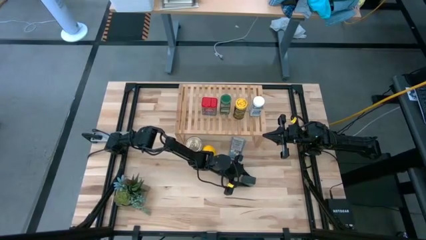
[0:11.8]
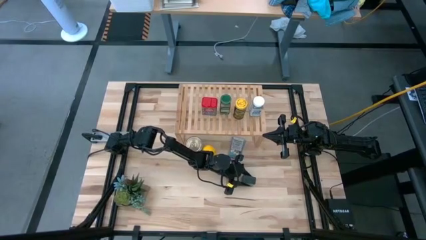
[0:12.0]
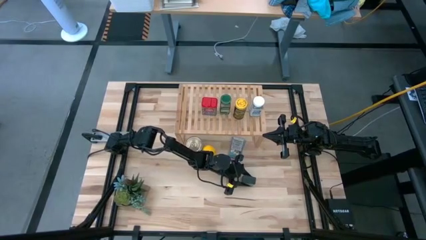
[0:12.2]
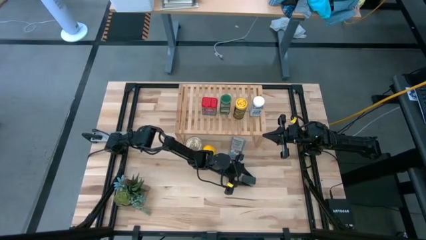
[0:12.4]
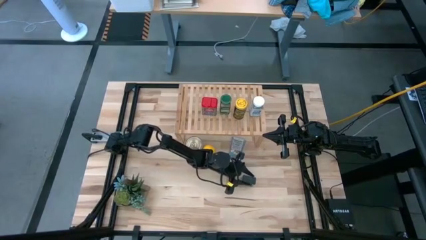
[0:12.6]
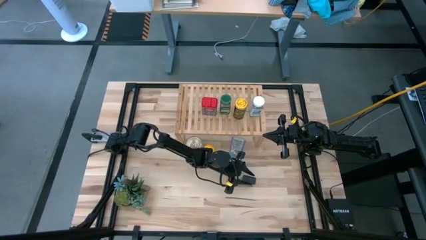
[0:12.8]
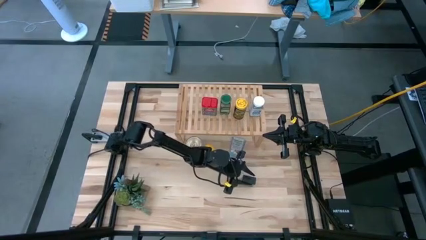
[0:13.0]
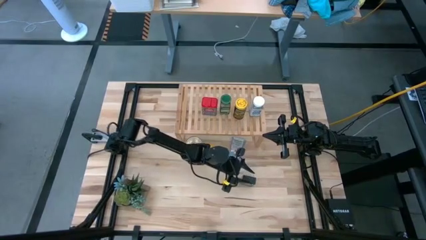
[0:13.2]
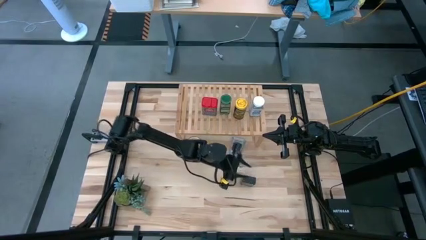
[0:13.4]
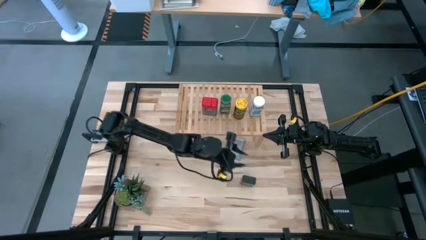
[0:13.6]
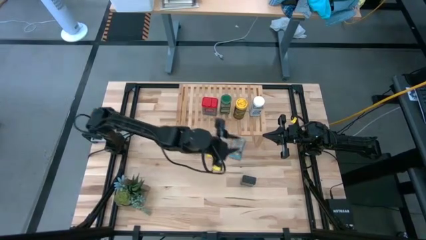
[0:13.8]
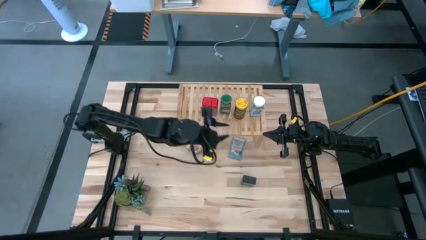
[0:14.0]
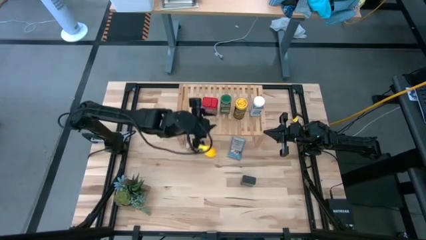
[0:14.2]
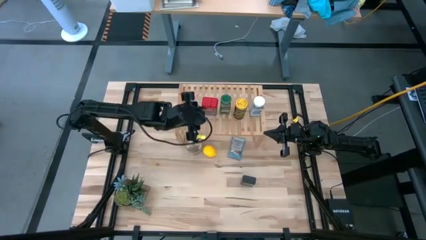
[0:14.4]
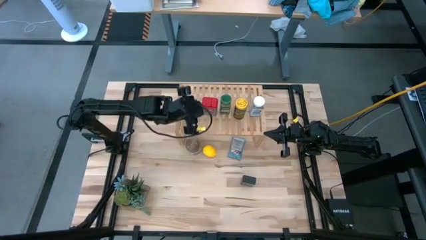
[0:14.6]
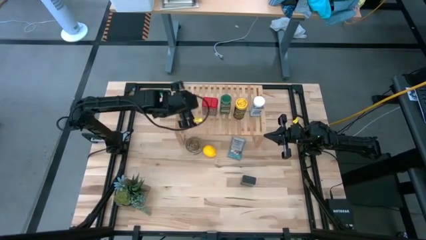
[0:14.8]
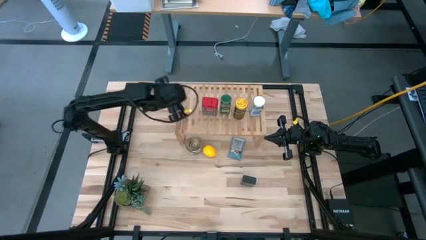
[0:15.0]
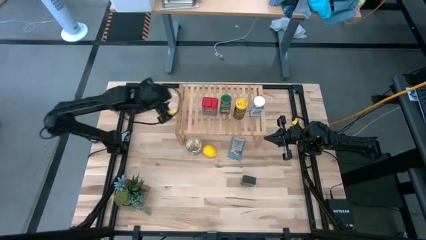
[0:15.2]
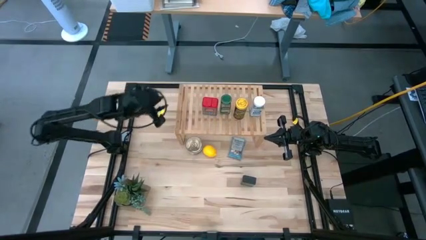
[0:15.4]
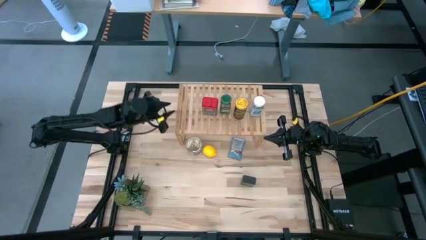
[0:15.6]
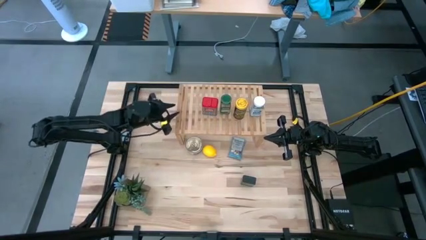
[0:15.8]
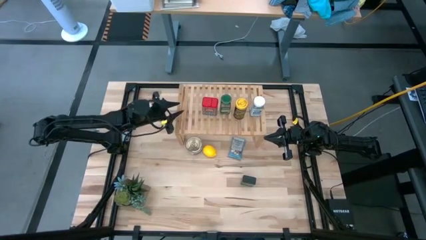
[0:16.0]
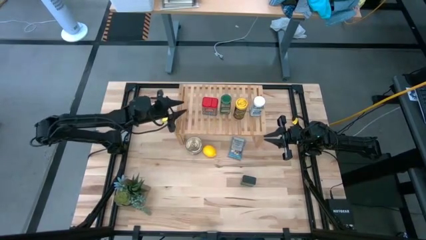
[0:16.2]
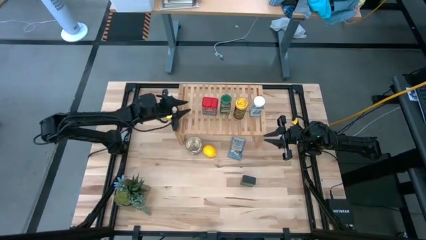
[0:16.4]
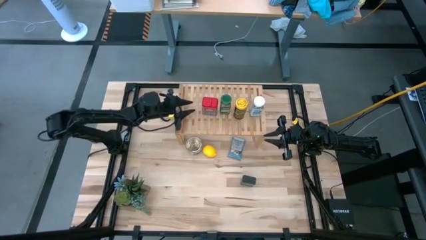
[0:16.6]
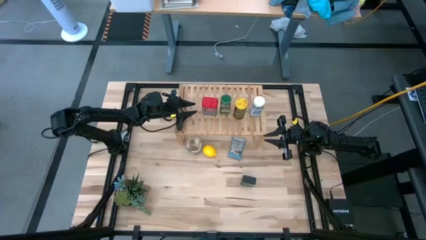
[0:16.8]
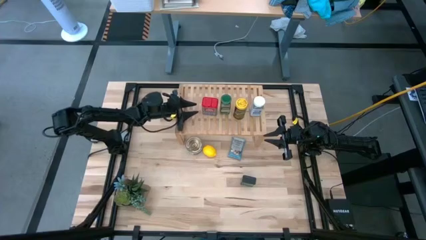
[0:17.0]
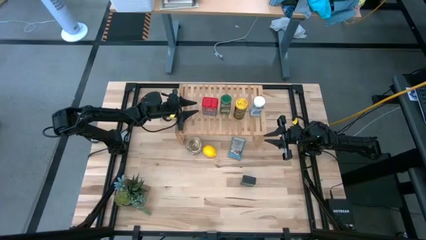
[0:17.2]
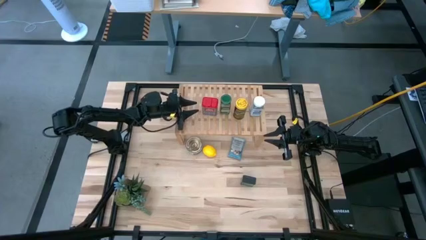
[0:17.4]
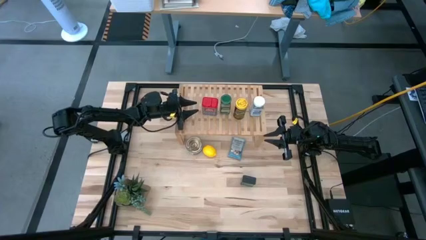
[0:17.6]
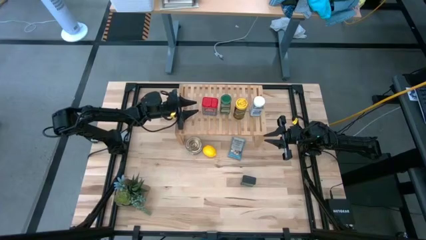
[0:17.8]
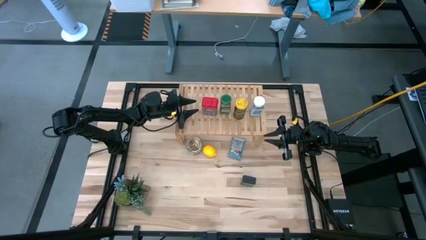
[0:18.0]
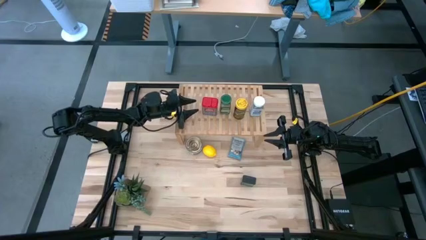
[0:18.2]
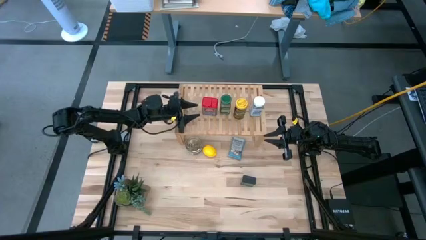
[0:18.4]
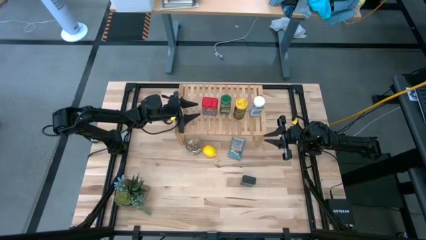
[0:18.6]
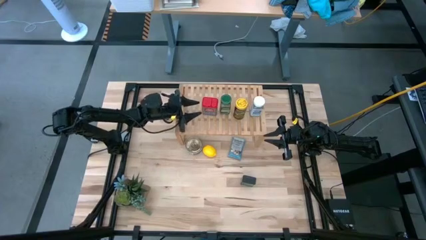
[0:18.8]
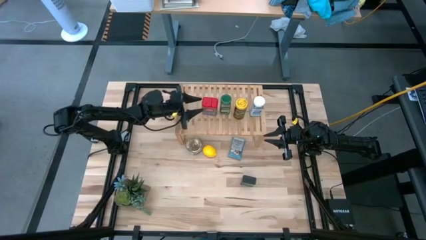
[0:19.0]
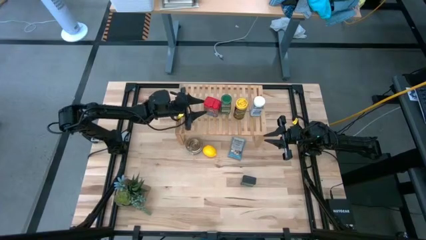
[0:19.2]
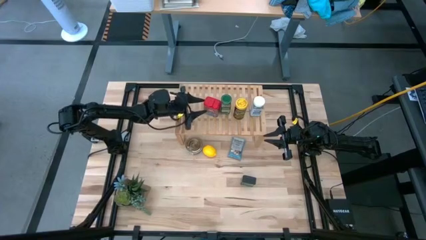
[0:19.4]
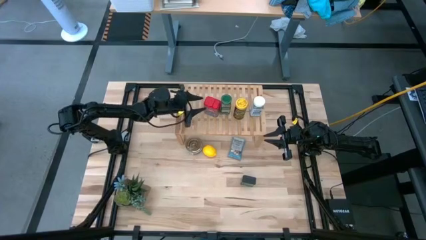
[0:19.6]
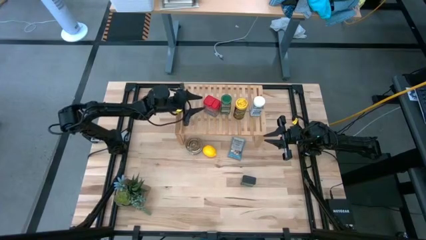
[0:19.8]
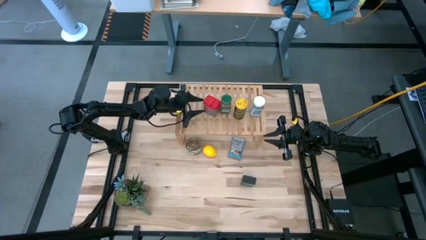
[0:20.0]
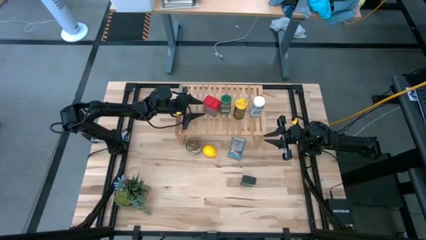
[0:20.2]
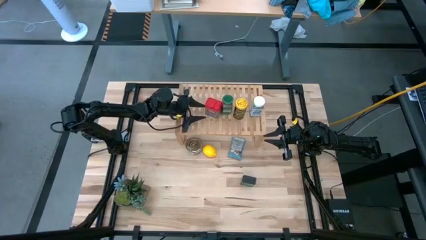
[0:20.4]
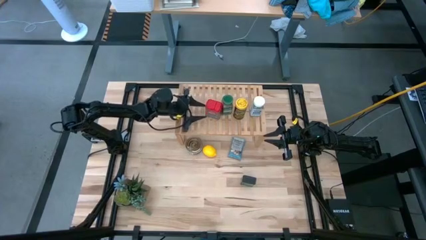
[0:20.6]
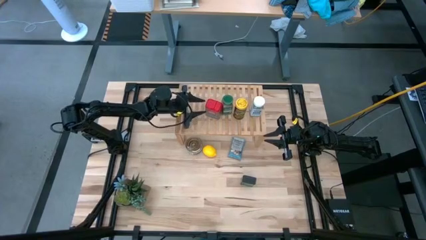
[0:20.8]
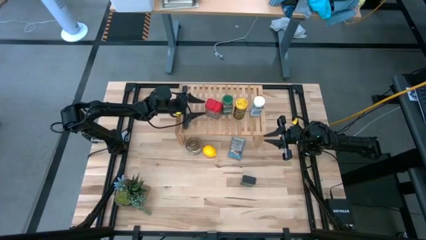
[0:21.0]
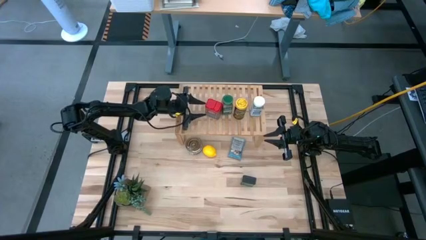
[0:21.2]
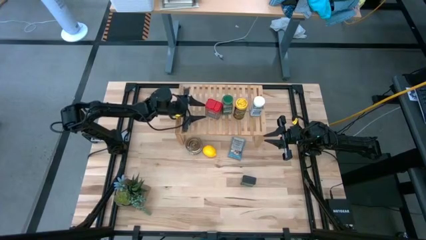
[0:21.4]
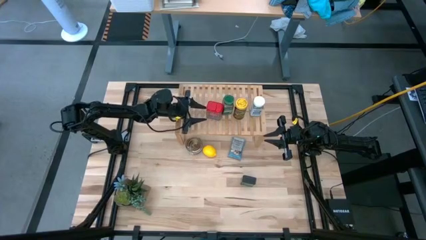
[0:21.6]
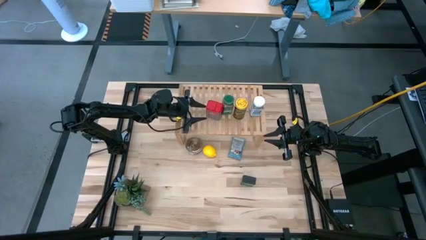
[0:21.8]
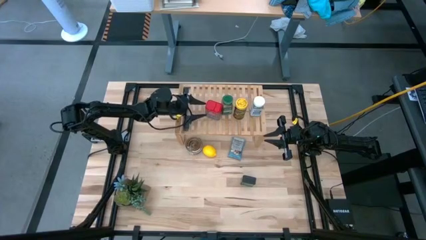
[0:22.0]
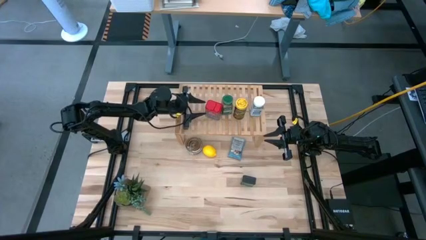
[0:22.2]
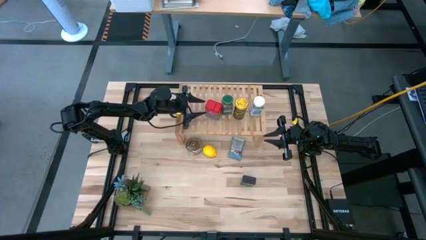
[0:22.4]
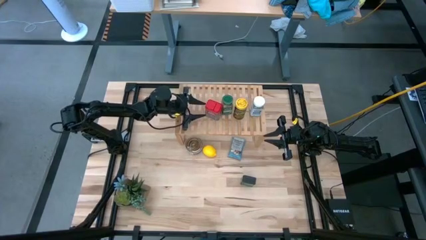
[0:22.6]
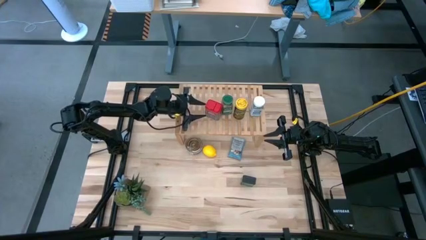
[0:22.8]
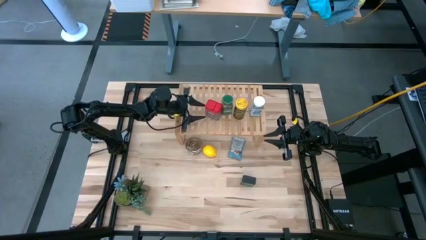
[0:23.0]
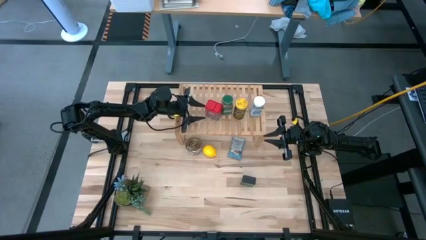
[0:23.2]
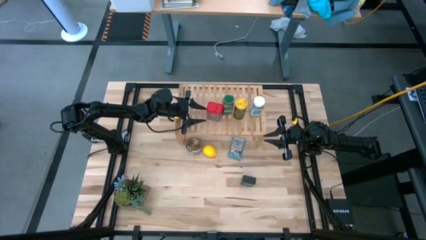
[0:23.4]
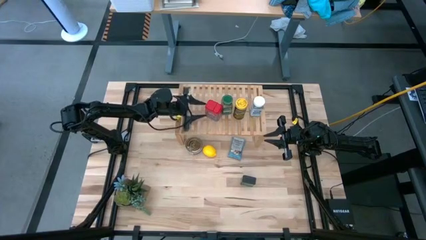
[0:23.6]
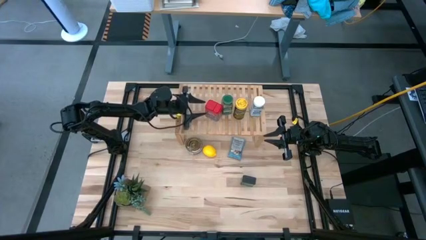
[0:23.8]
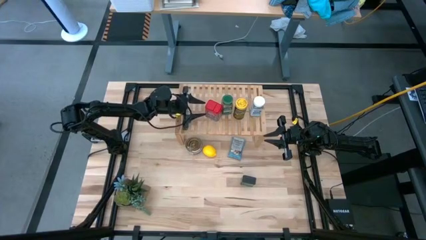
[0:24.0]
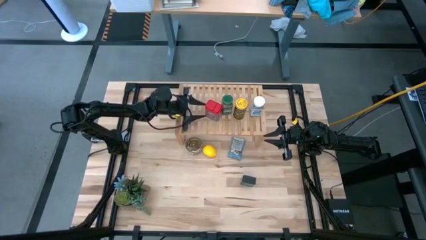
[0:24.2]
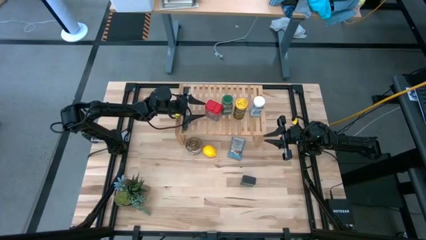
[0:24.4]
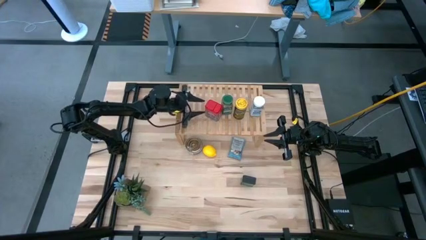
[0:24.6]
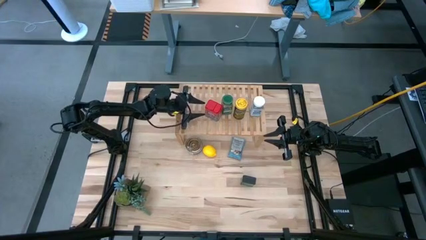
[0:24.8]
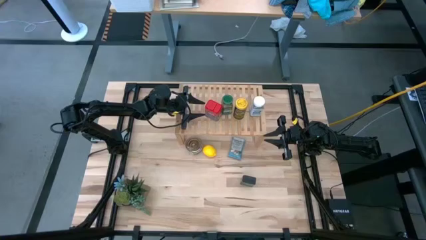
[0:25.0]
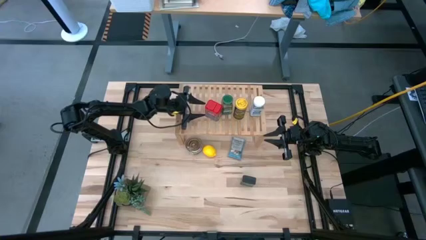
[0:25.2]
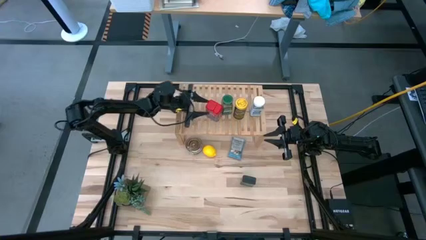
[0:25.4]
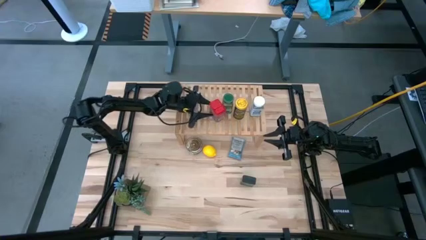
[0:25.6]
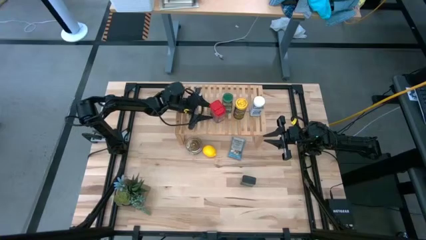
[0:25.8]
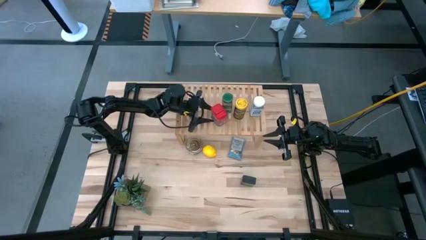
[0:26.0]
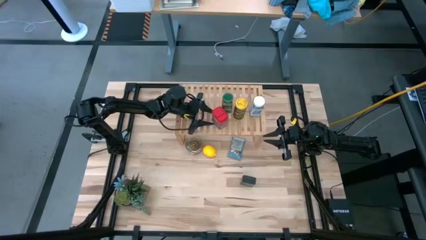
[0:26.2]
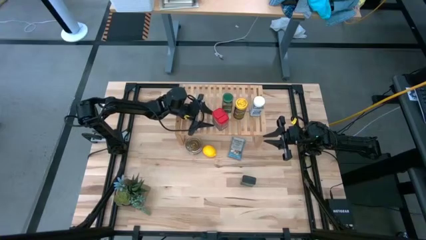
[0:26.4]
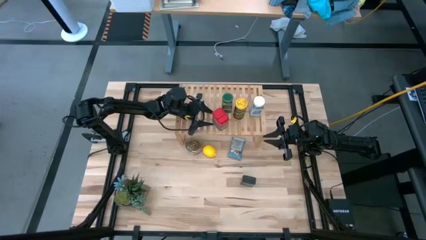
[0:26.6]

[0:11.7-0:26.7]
Task: Shelf spices
Adjust the red seasoning can
